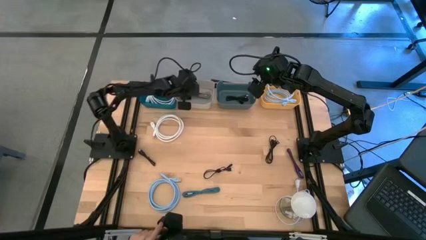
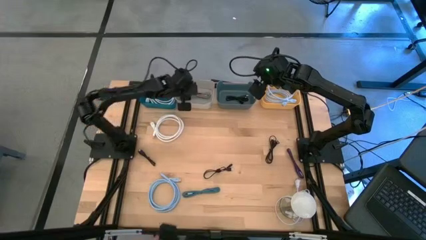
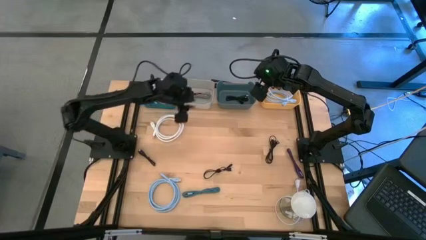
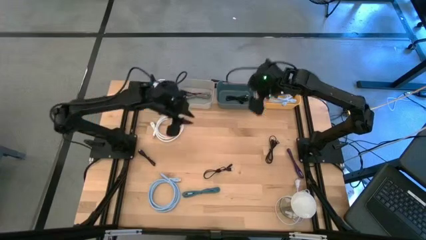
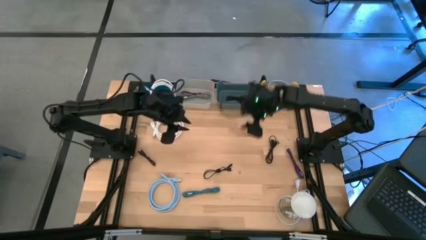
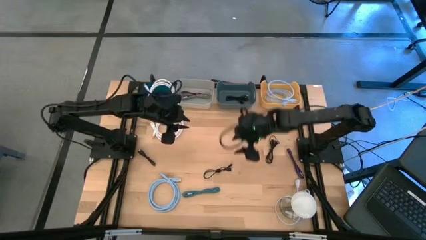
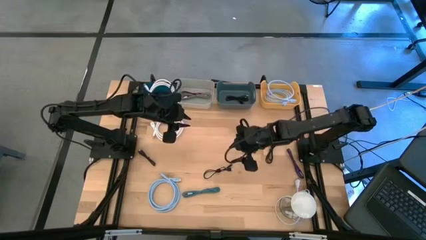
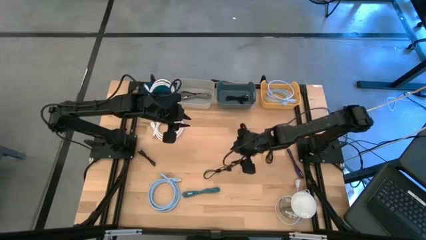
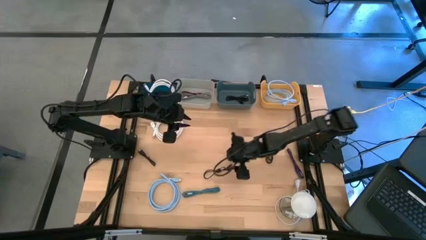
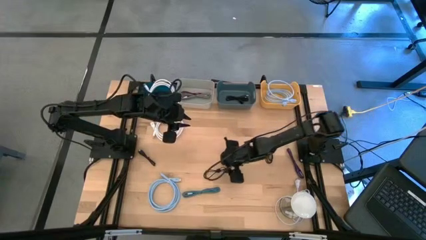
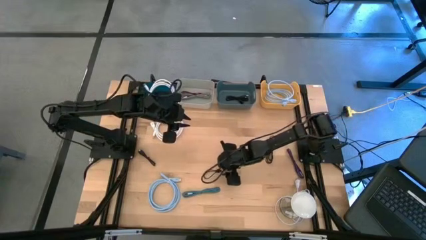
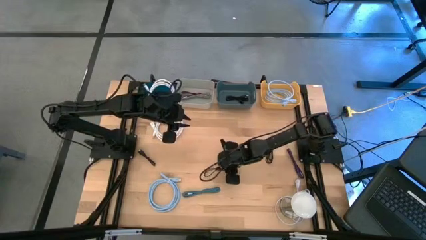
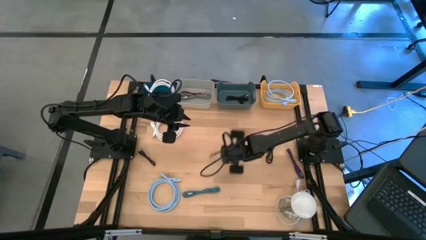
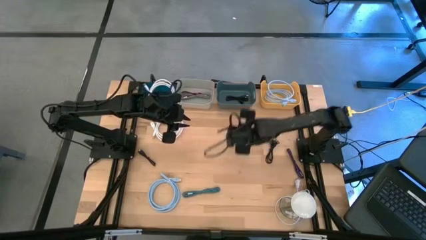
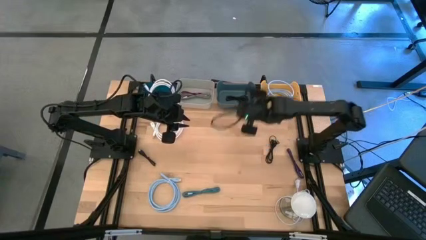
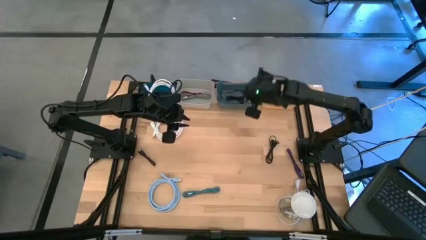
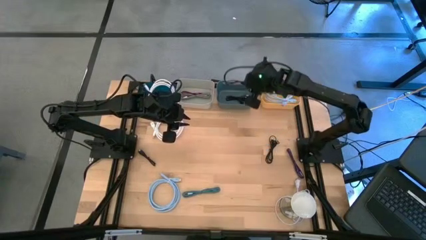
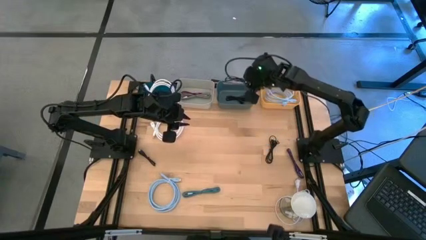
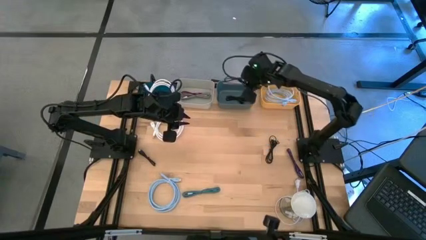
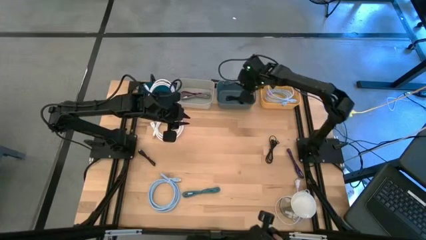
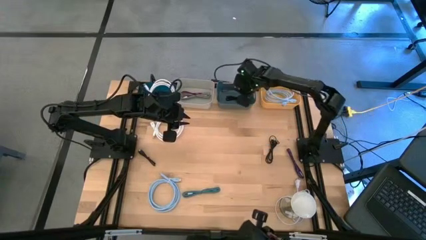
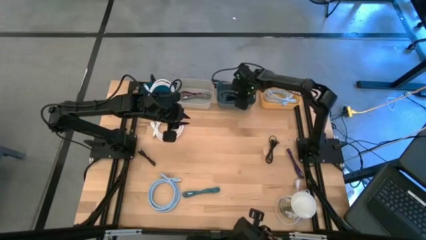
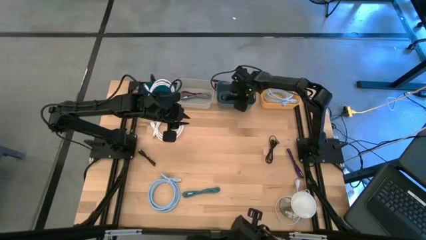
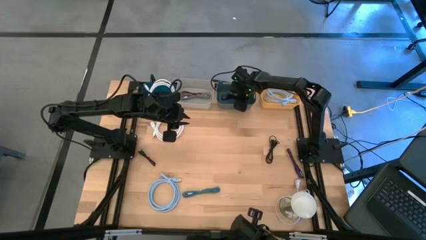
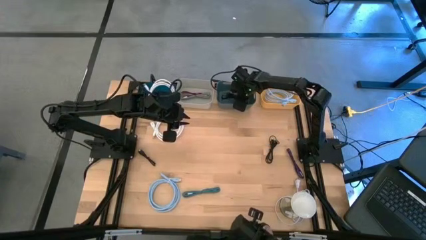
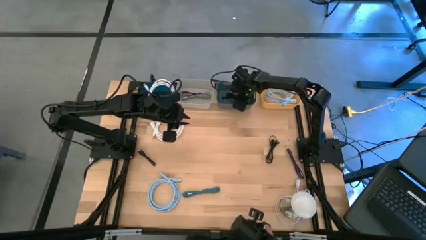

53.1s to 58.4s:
Task: Pick & Place USB Port
Put the black USB cable into the dark blue bin

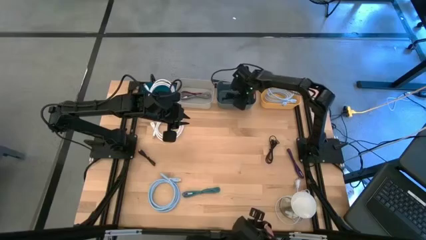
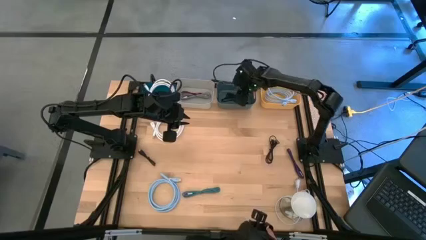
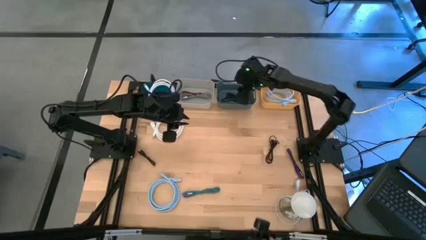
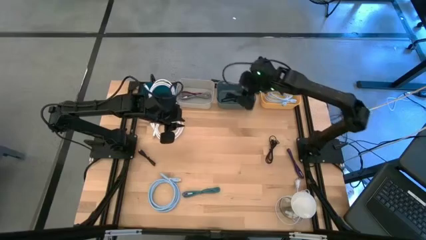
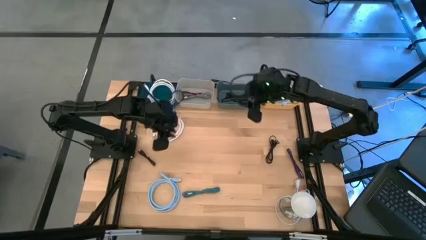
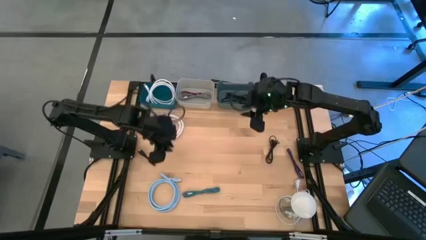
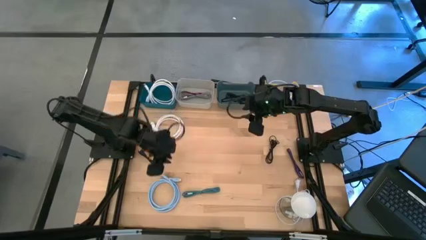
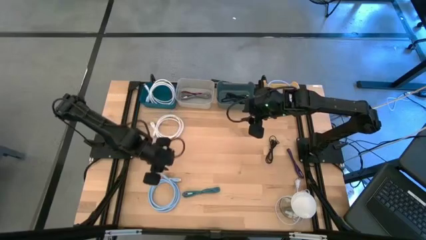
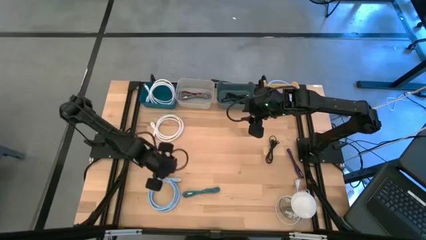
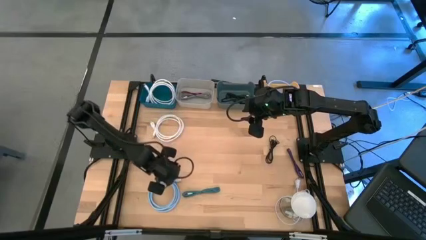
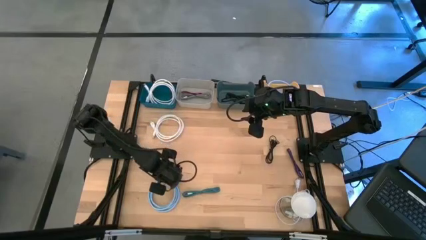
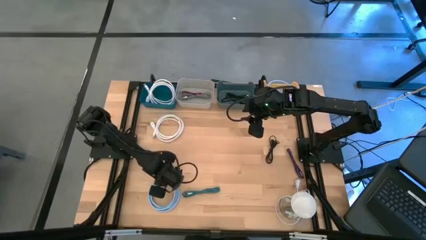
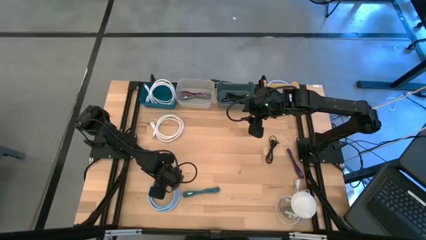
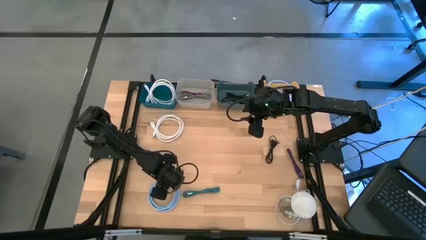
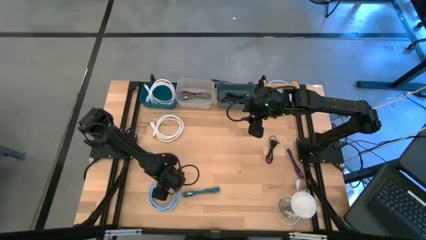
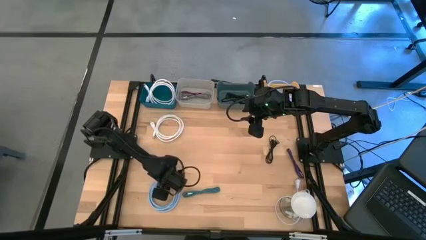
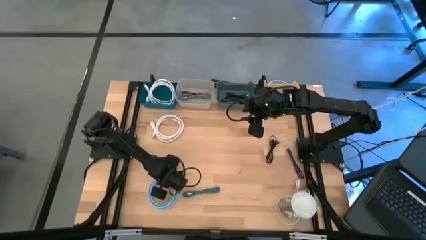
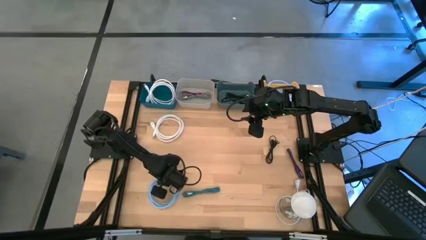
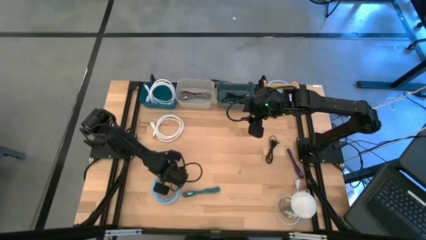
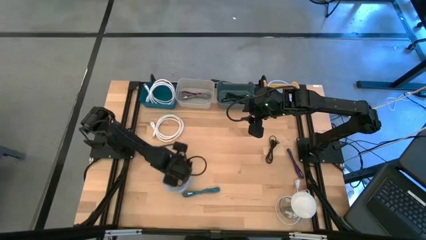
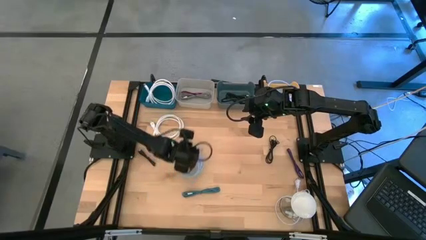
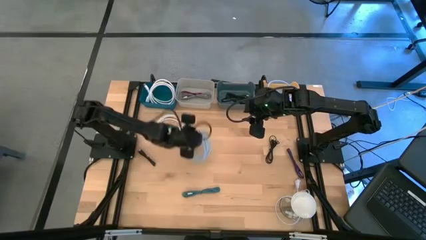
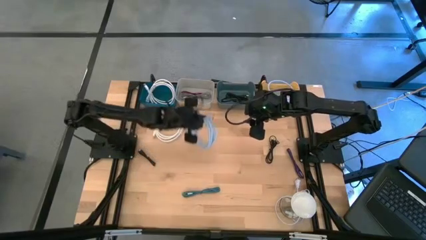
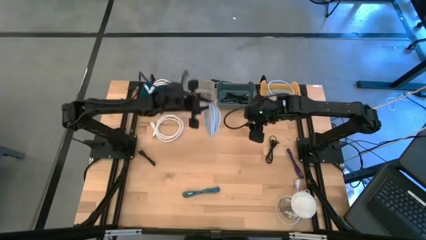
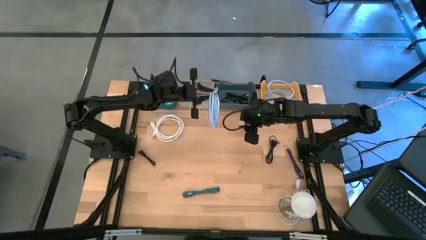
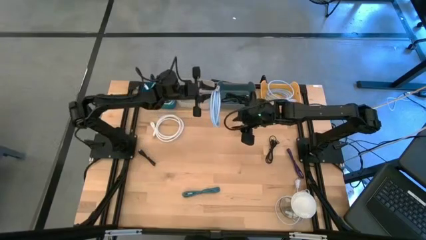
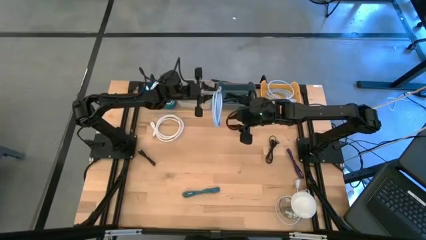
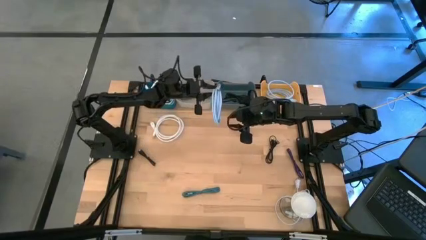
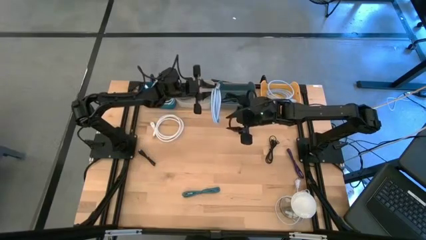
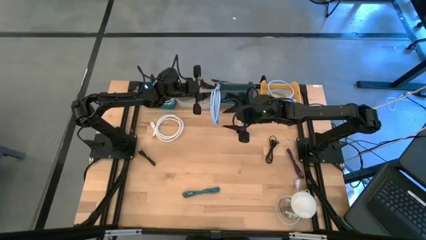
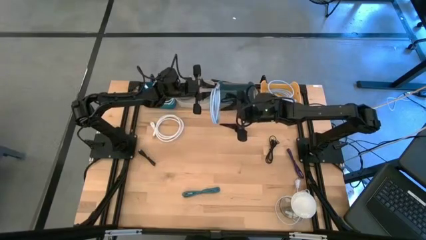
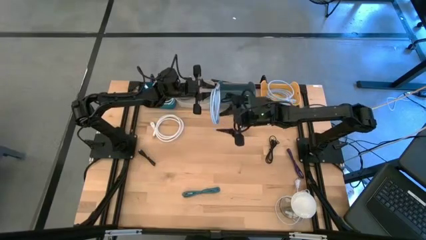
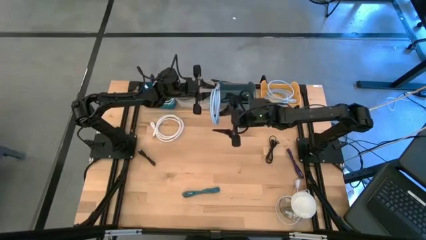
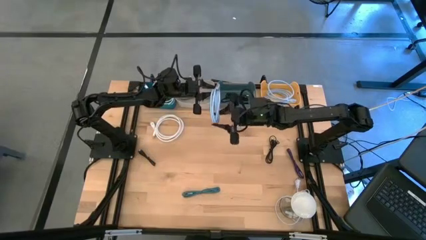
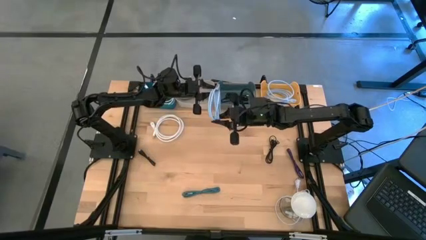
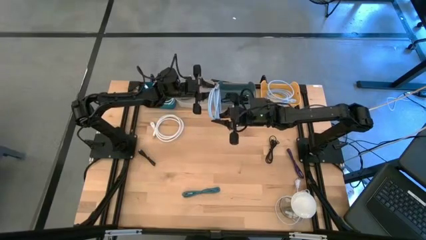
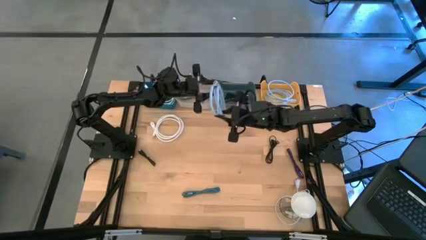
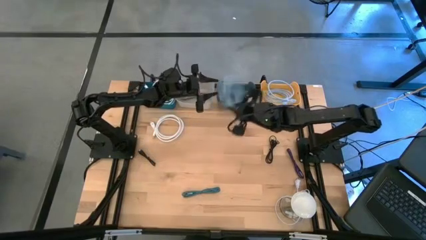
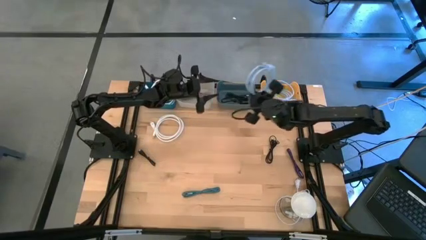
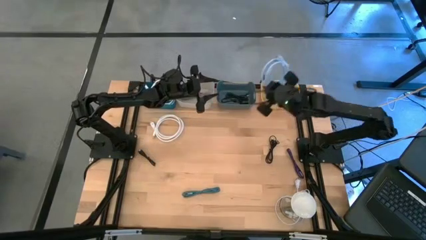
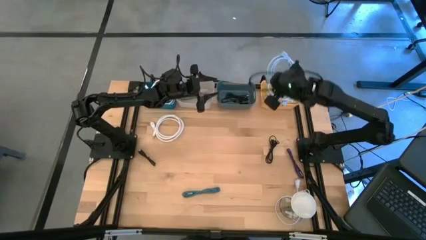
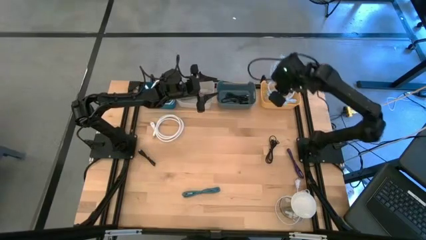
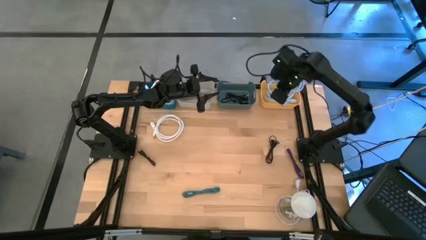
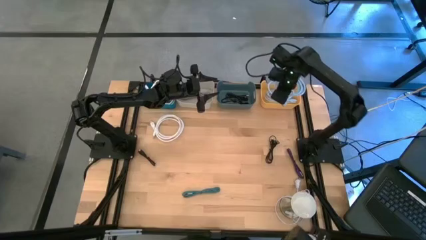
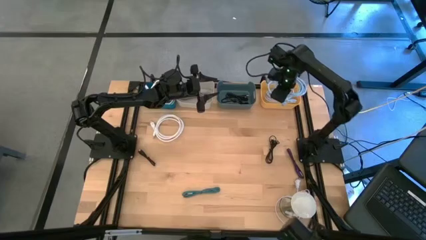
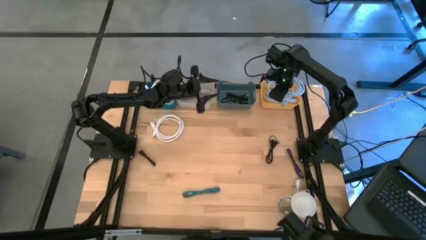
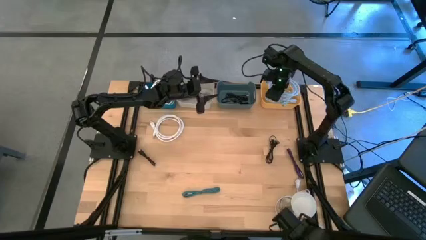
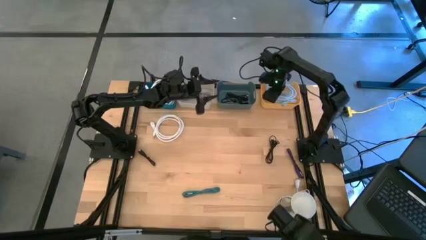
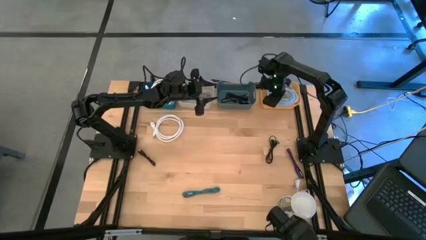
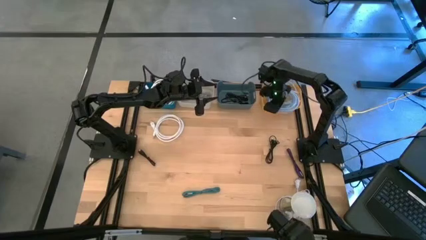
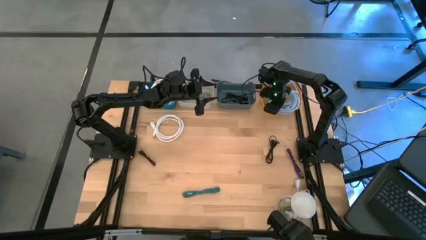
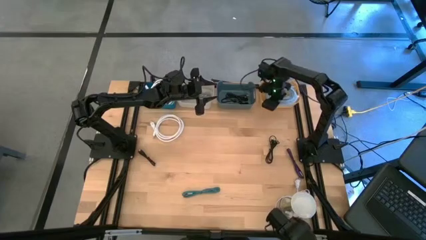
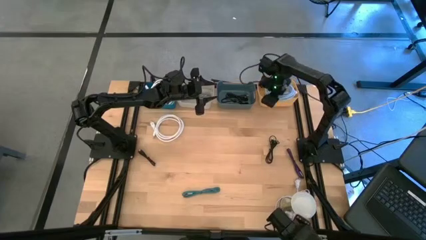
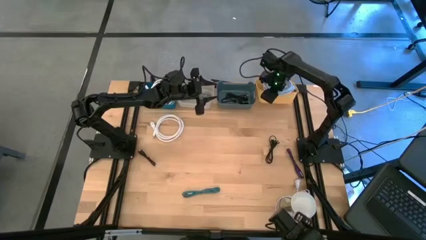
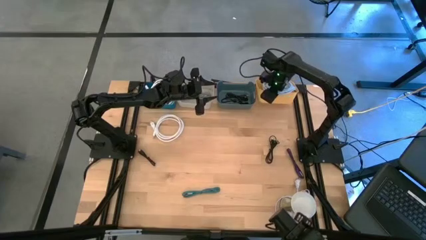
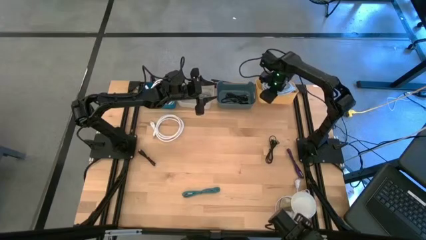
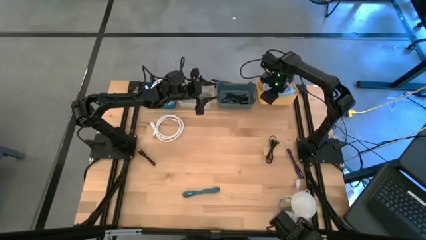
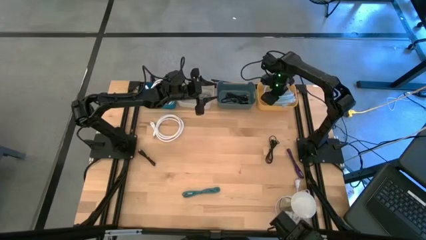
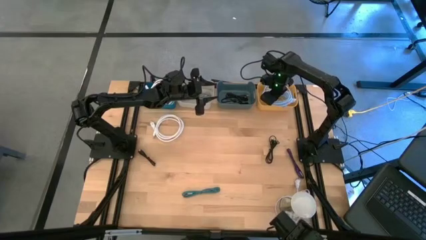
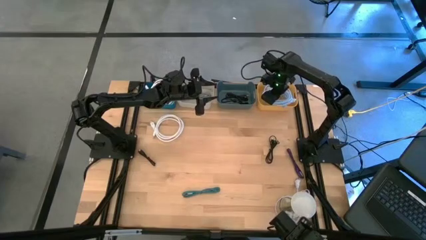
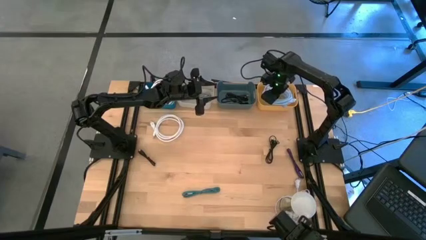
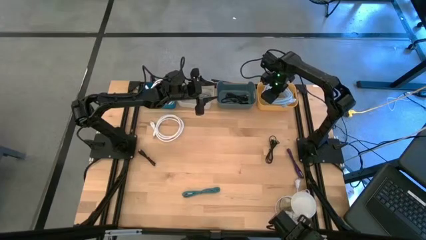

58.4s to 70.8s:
Put the light blue HDMI cable into the yellow bin
